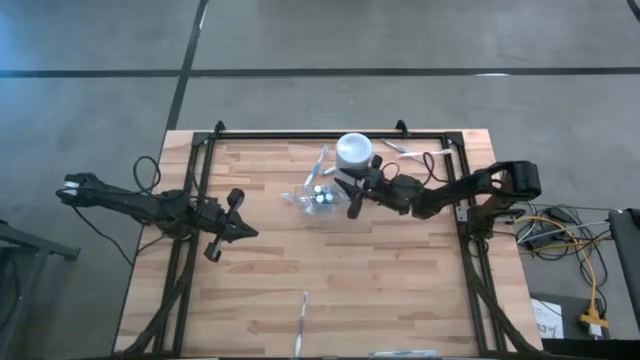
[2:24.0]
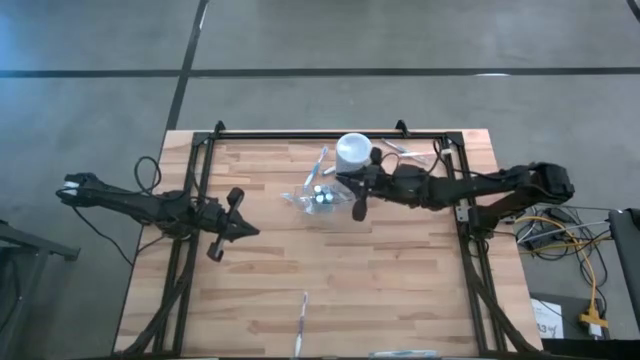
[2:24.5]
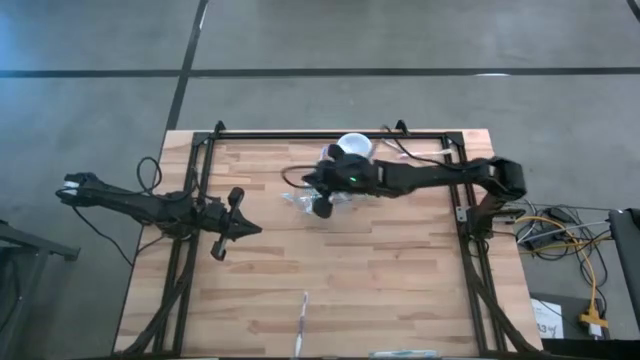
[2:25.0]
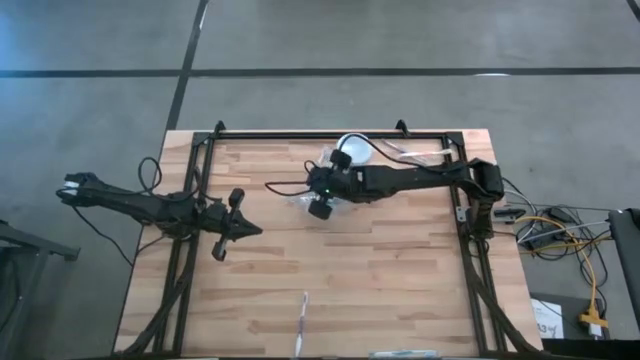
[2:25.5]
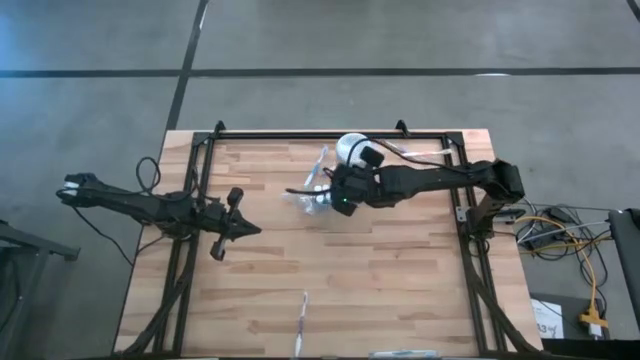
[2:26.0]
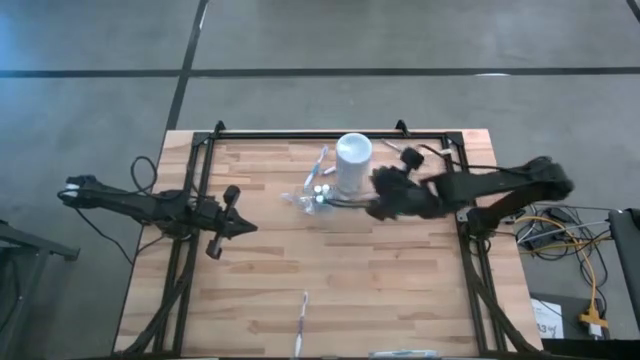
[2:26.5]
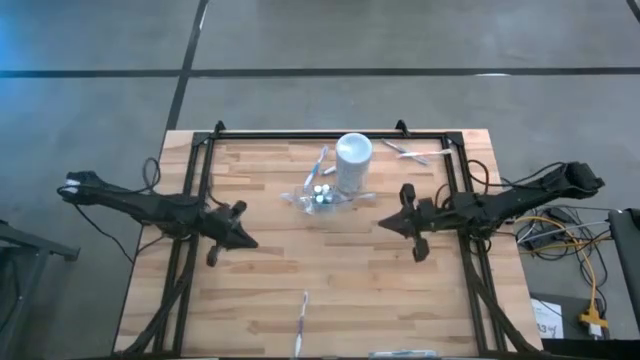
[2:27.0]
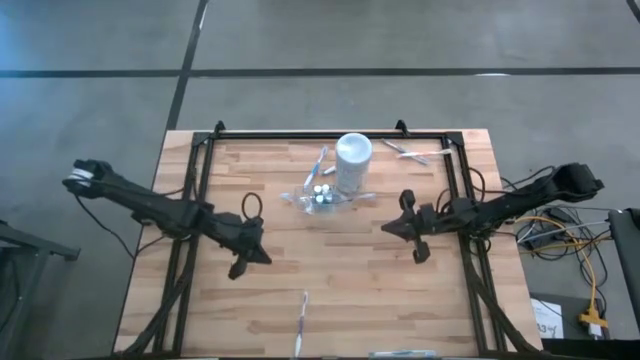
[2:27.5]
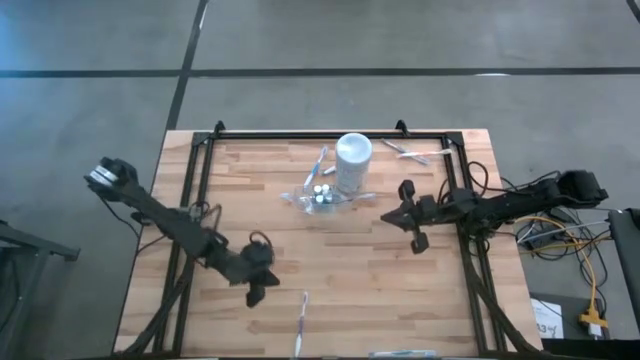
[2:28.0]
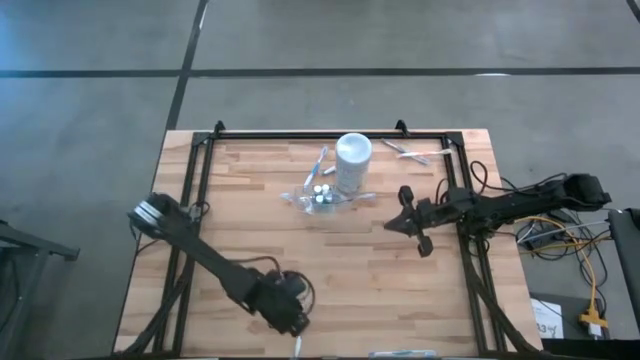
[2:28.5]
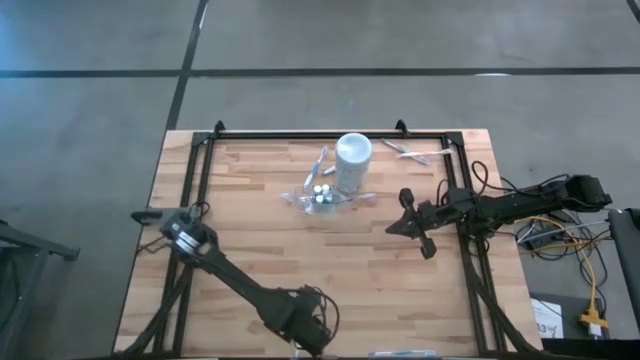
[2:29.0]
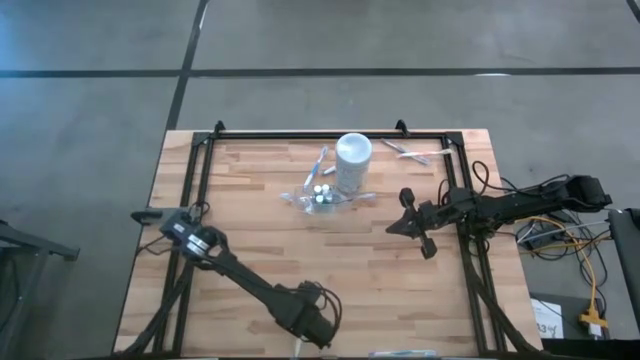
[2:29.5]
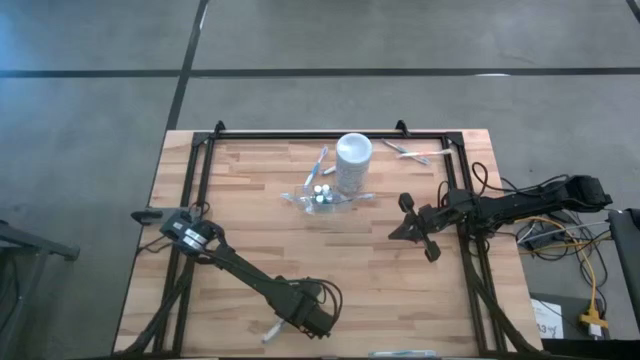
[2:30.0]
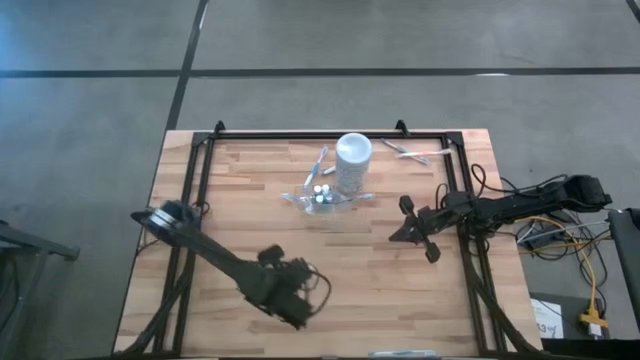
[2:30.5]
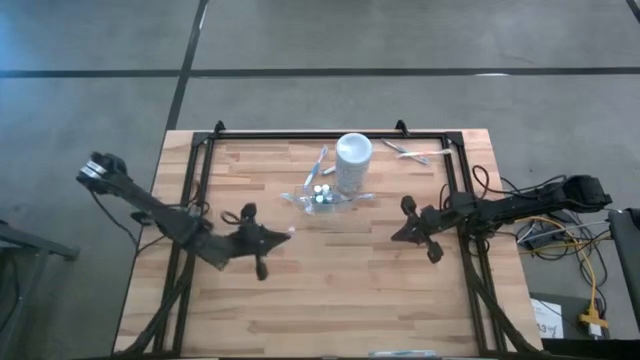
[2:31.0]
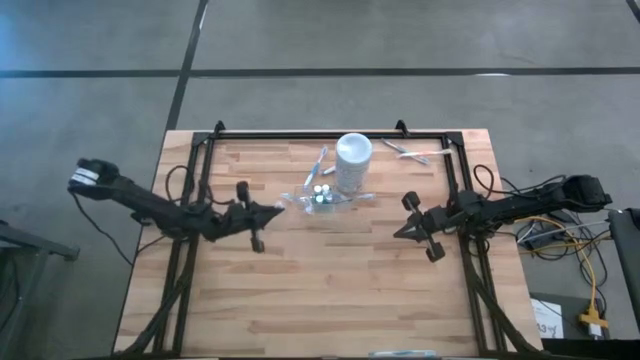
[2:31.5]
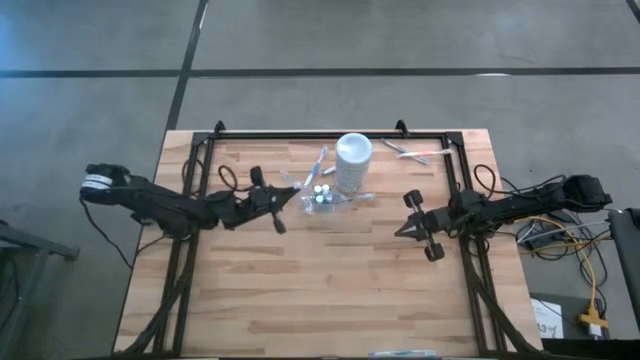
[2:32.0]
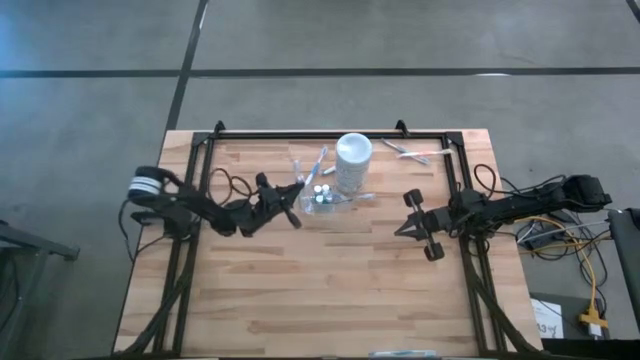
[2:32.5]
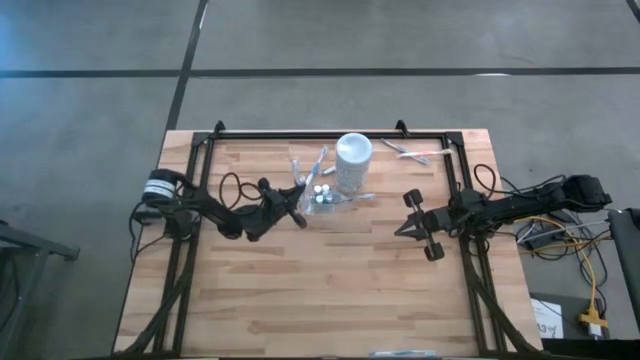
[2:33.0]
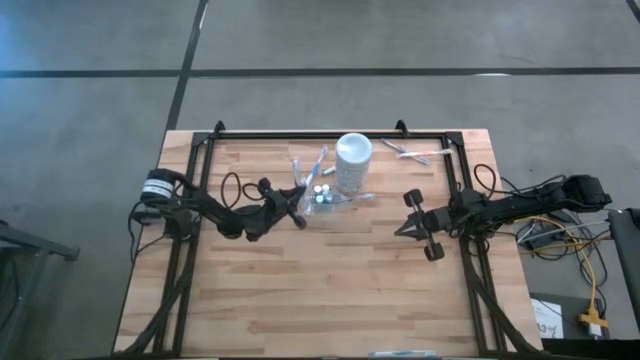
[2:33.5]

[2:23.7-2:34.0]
Task: Pick & Place toothbrushing station
Put the violet toothbrush into the transparent organizer
